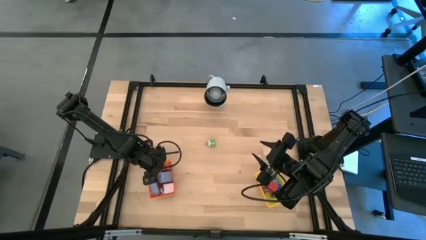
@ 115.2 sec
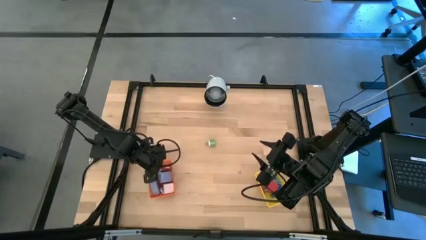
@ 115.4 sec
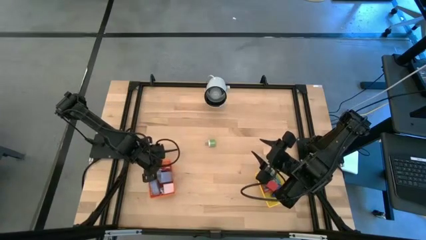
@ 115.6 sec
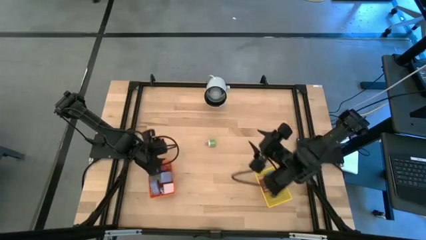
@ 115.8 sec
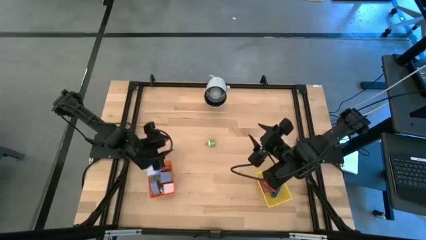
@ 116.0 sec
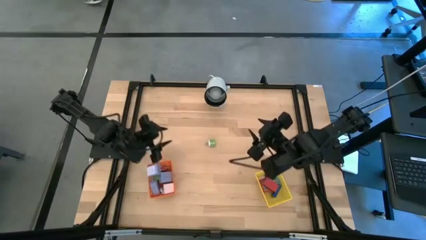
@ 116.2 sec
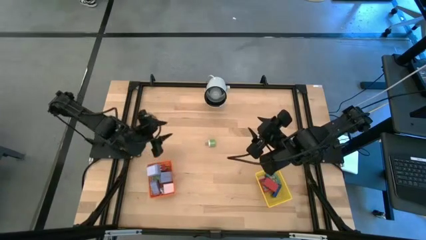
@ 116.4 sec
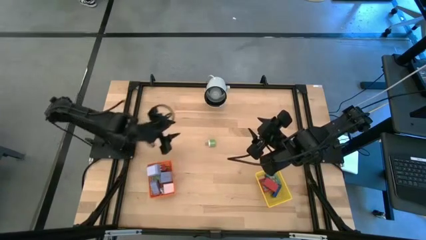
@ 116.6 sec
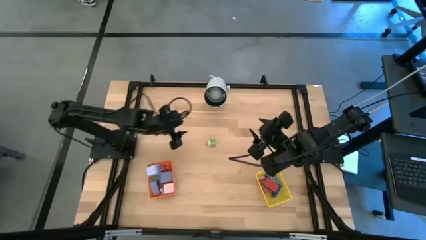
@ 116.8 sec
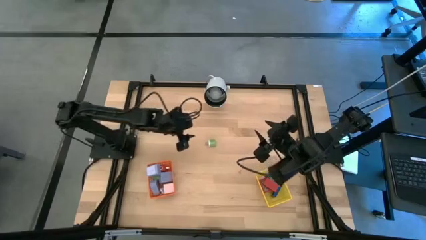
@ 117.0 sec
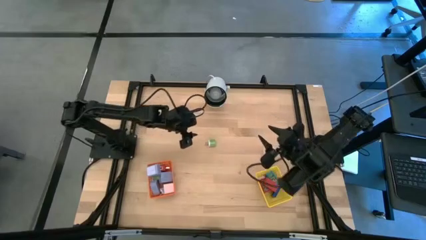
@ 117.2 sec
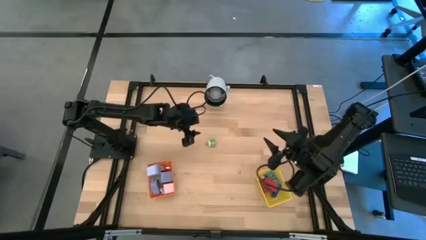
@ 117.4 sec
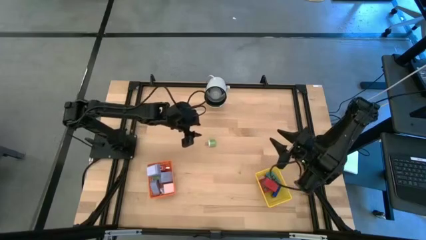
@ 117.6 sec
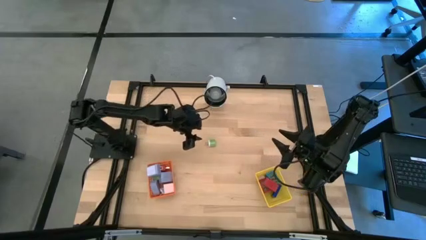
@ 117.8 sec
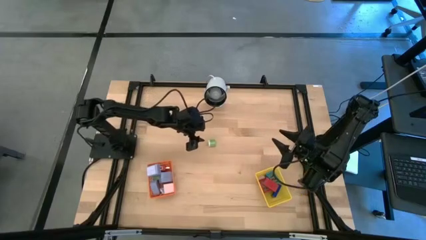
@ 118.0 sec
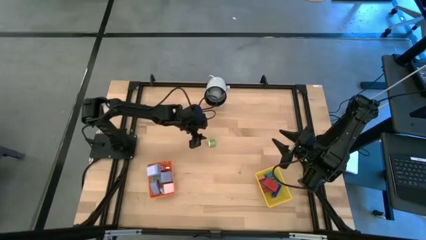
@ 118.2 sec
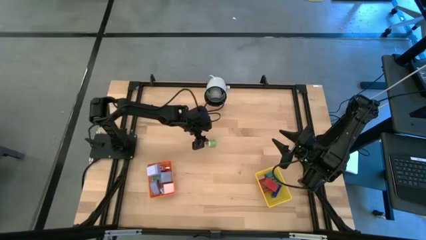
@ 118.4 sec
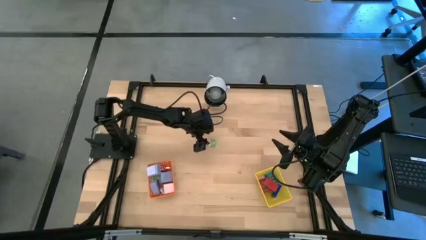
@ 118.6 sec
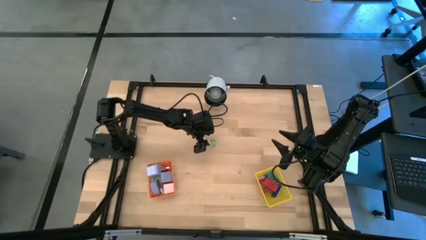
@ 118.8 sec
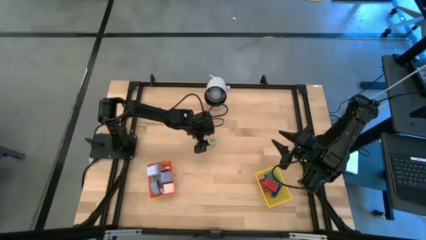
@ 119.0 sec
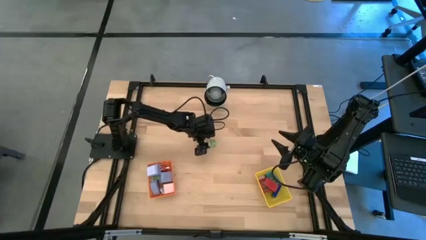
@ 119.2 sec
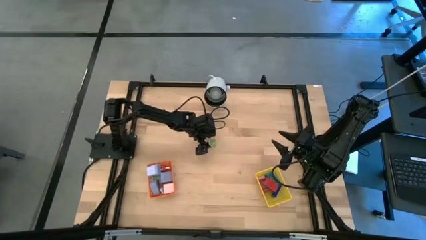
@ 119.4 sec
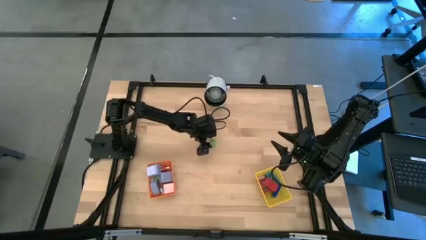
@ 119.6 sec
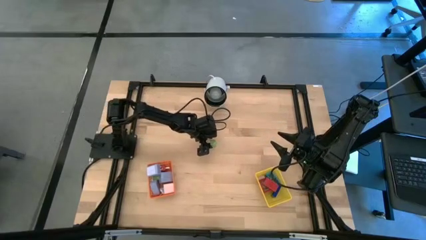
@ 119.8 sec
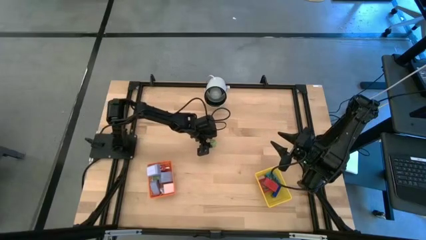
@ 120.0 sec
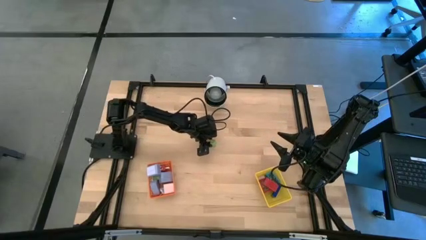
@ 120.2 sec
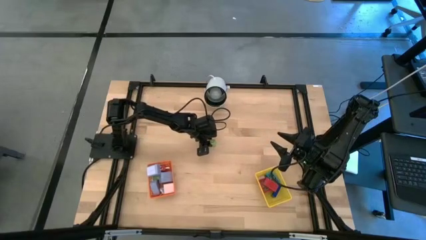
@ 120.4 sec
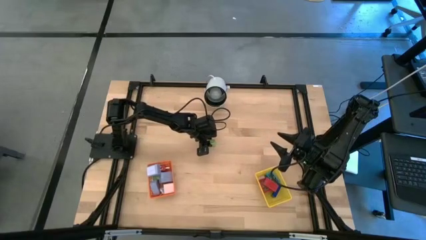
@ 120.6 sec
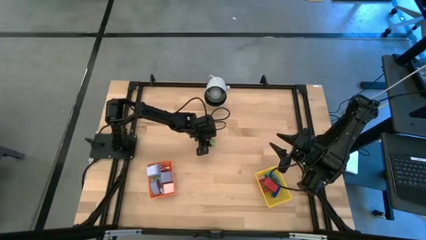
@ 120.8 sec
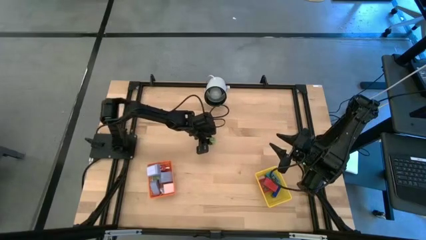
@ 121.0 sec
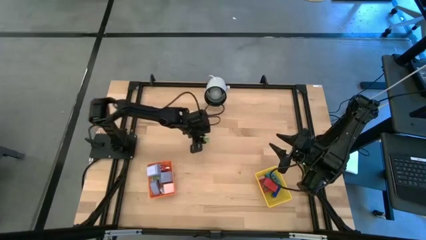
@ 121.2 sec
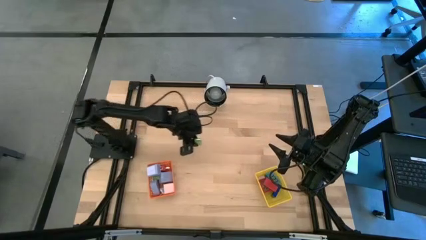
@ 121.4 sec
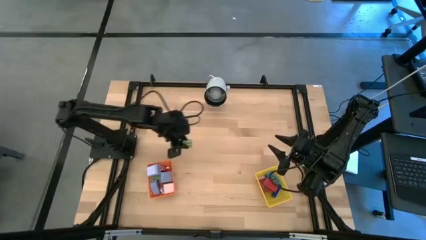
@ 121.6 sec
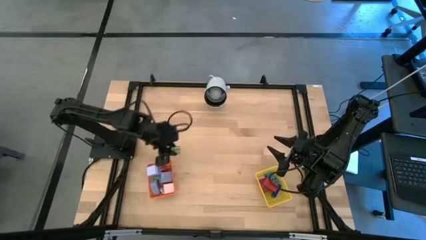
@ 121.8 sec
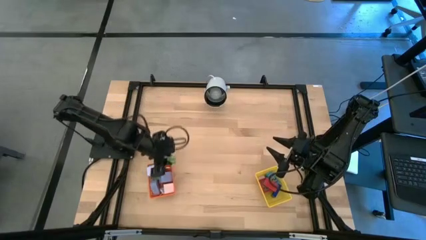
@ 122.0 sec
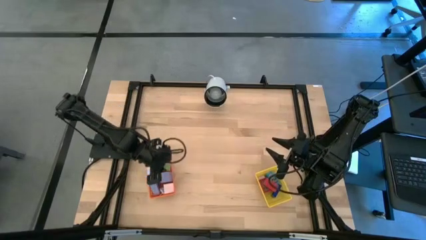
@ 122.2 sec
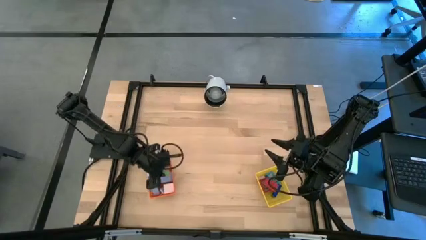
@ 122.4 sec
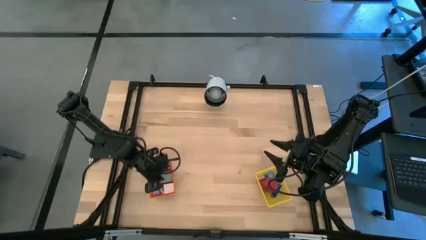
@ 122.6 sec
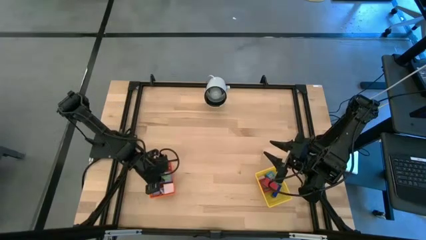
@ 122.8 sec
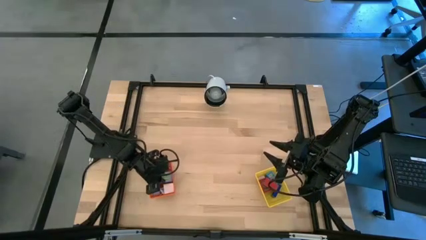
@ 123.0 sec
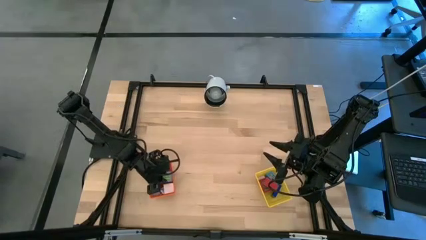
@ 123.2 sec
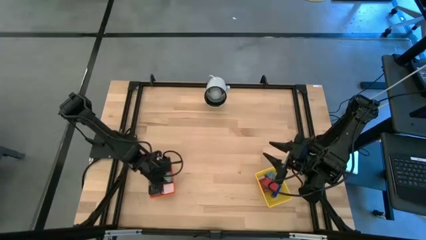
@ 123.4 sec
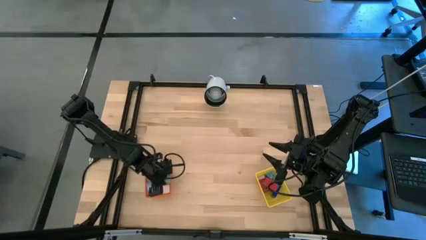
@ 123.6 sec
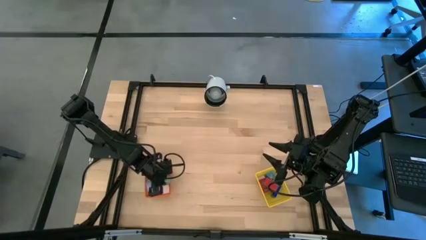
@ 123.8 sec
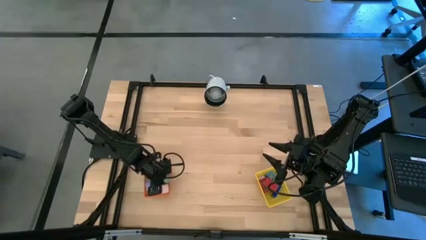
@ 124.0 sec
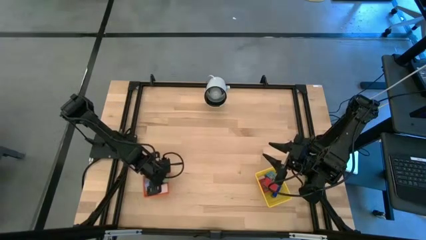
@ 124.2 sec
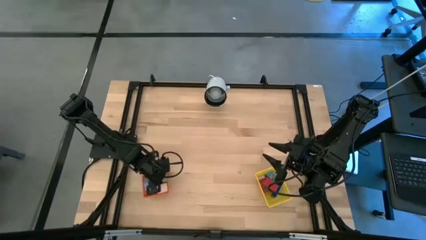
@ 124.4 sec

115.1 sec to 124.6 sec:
Task: Pick & Place Office items
Put the green charger adapter into the orange basket

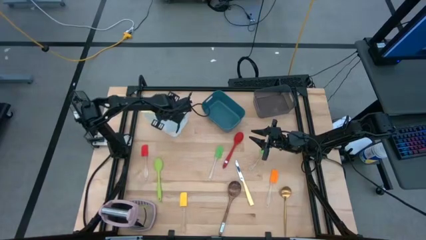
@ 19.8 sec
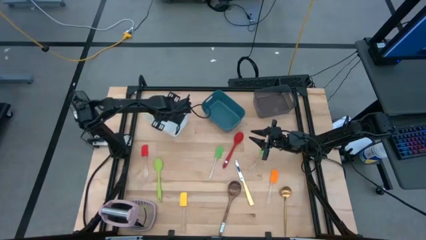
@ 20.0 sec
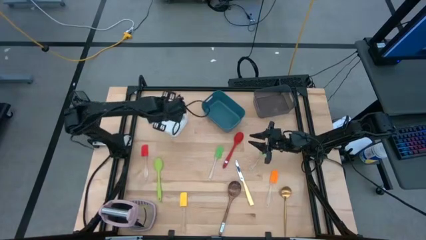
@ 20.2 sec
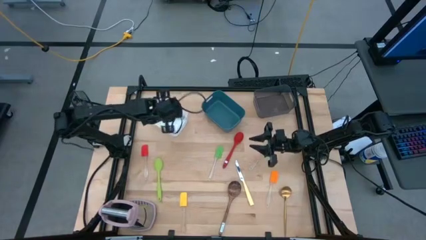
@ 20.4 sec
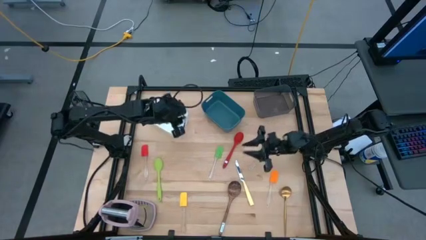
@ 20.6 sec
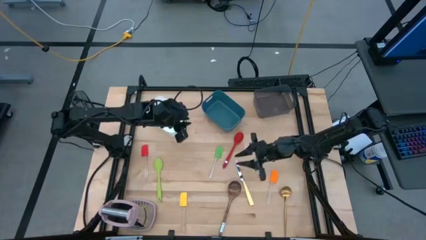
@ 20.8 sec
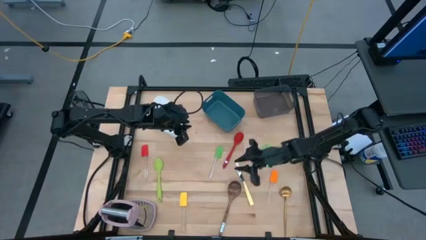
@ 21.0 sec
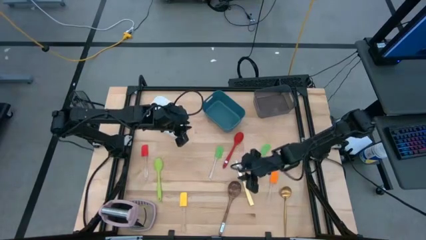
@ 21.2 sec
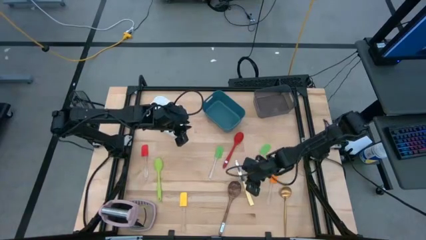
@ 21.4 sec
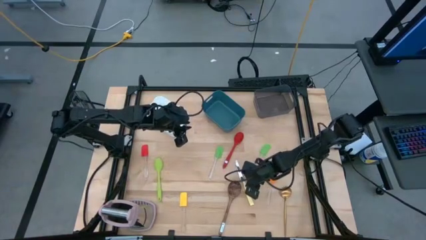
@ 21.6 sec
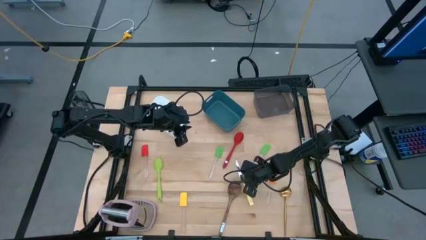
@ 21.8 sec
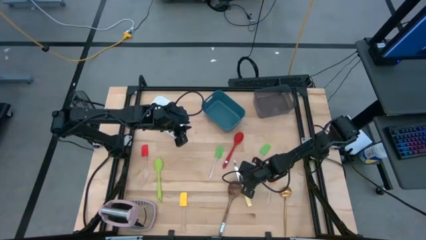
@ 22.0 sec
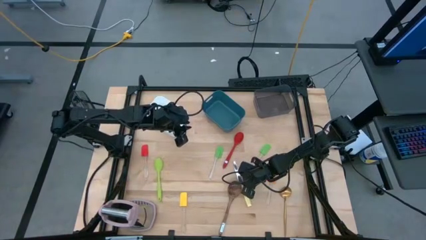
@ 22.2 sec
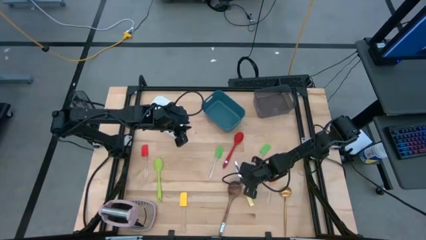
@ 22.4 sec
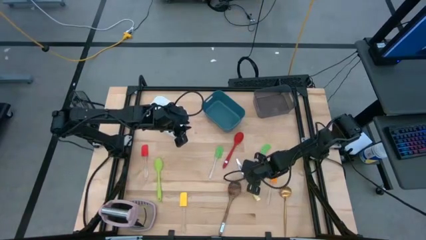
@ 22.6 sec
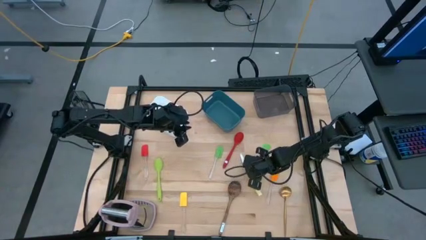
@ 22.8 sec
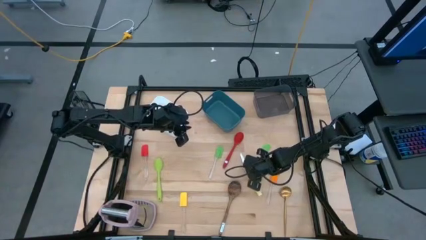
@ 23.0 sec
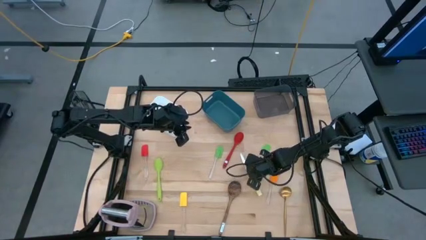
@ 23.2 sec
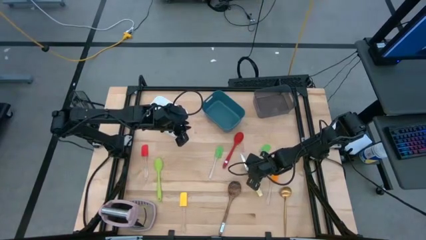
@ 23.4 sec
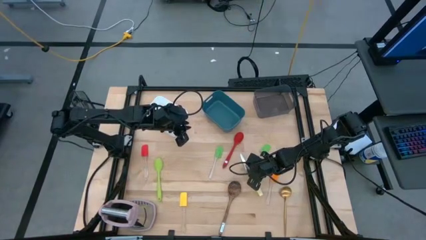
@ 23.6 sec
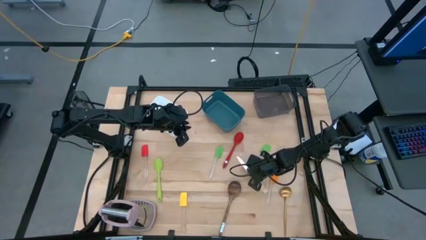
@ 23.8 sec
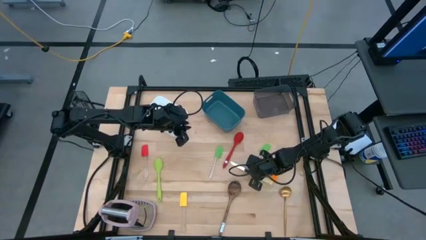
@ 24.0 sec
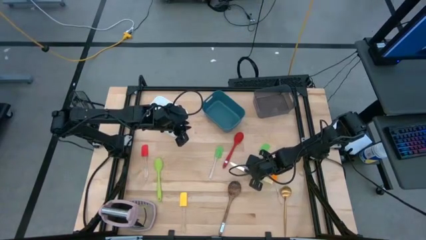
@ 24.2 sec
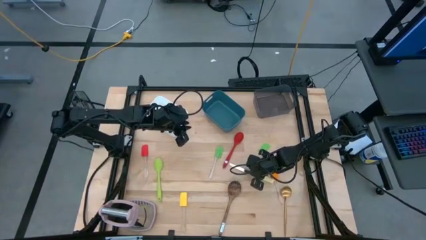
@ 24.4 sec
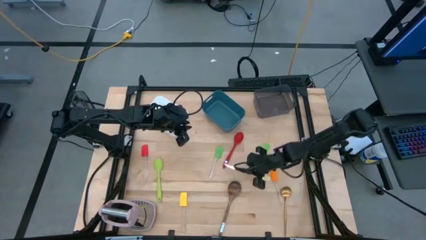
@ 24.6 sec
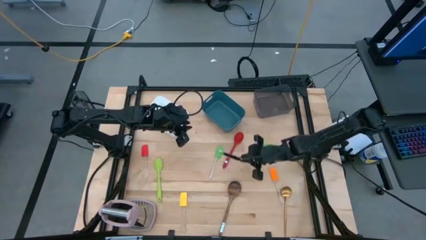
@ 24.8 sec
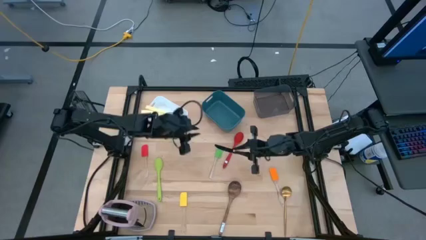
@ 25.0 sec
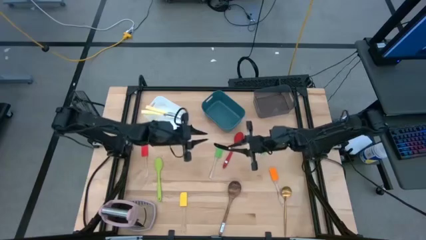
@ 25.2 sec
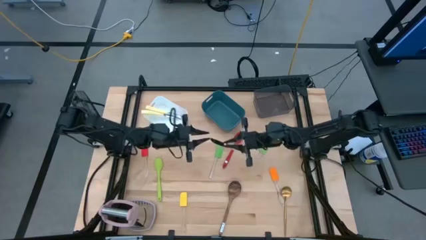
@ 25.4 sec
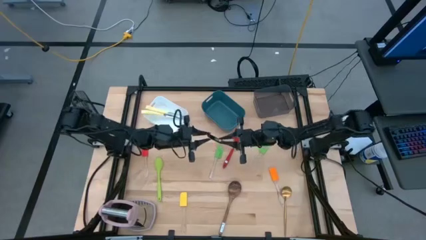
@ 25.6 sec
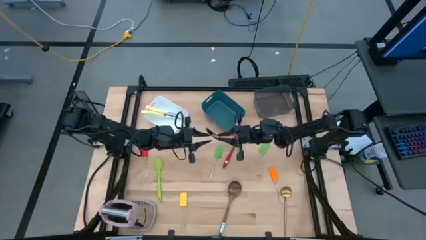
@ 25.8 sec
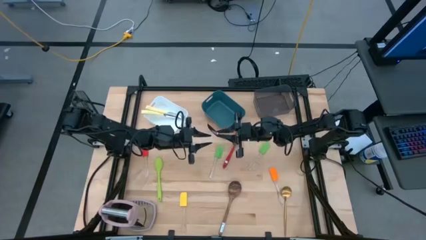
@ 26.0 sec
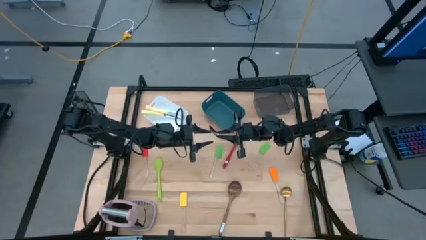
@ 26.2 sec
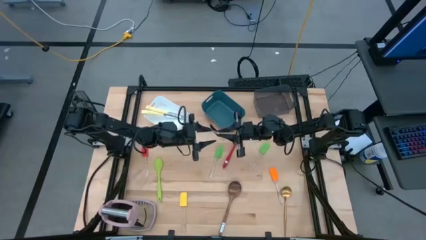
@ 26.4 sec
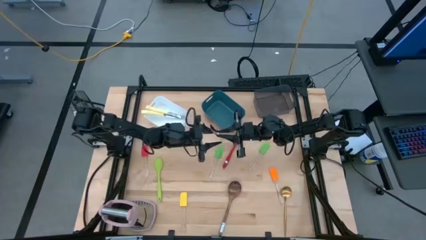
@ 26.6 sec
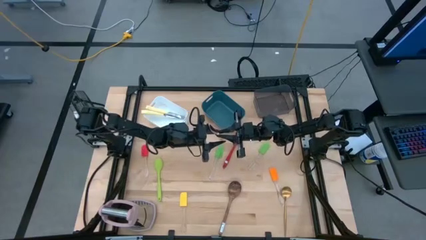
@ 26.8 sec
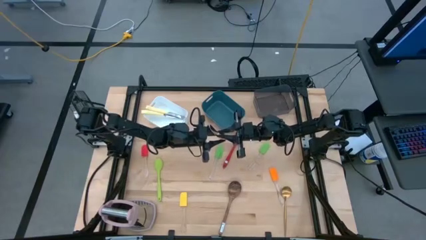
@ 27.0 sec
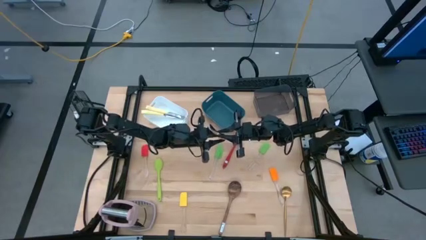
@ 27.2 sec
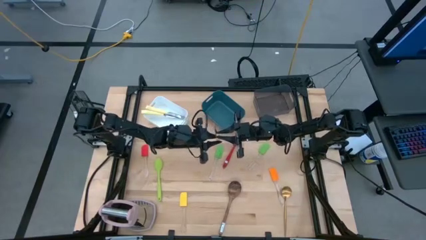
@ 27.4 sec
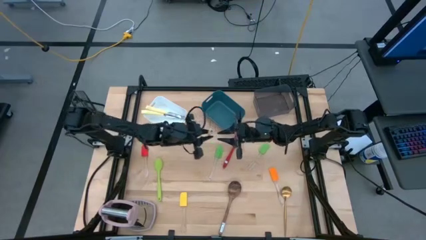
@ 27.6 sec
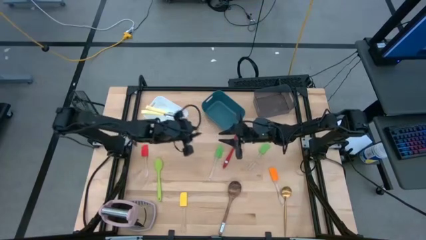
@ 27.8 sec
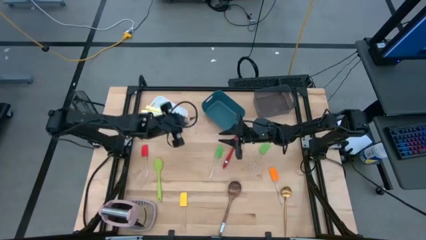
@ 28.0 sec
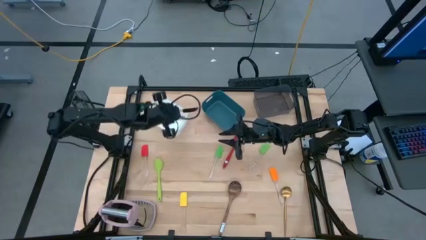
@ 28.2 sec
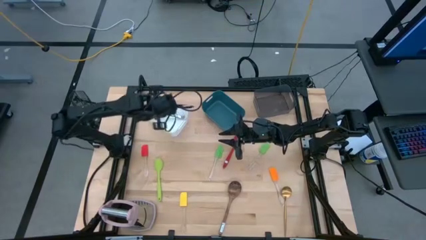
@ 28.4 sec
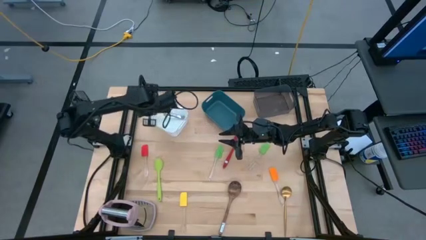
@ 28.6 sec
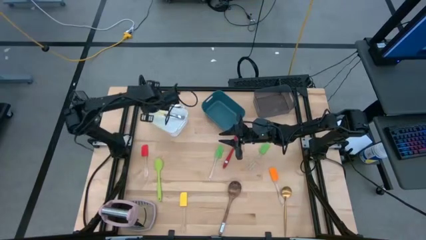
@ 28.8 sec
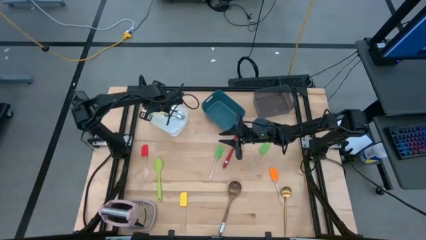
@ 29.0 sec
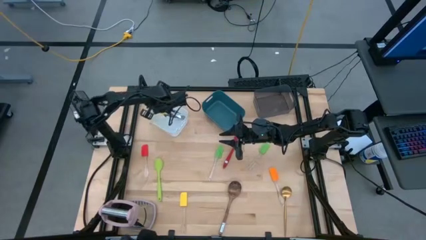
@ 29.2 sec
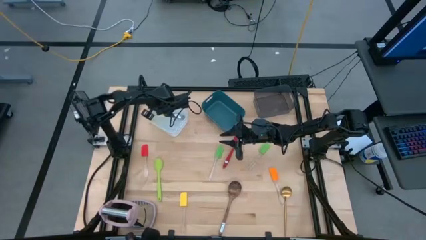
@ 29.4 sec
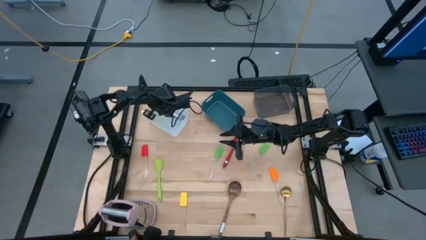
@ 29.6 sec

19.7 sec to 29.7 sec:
Task: Pick & Place Kitchen Items
Put the yellow knife into the white bin
